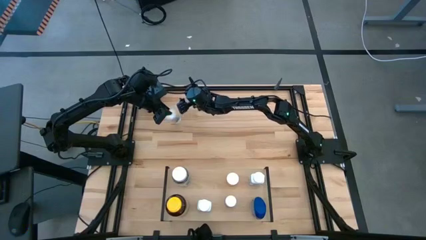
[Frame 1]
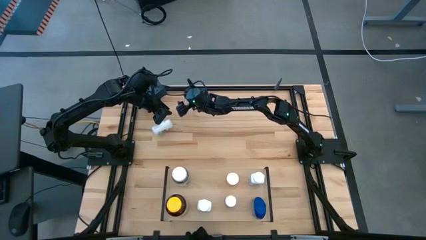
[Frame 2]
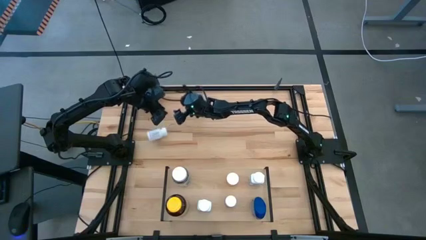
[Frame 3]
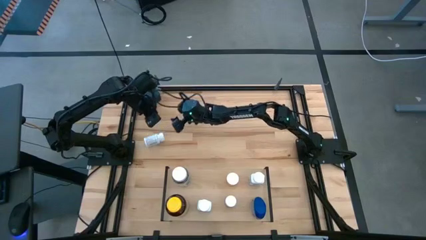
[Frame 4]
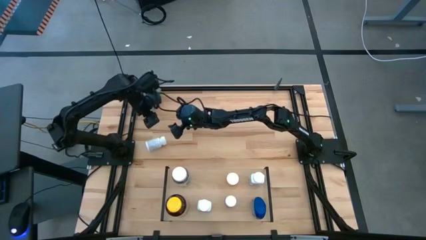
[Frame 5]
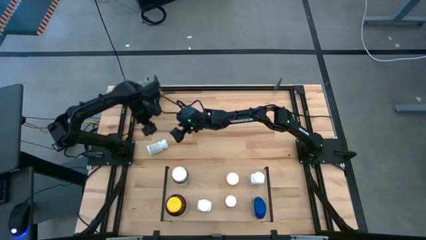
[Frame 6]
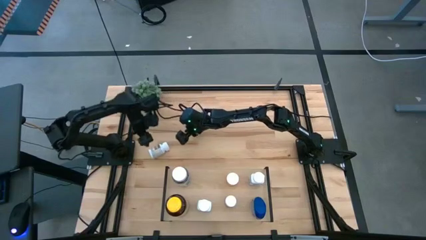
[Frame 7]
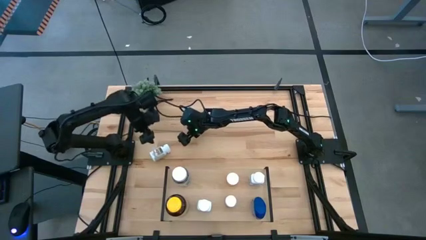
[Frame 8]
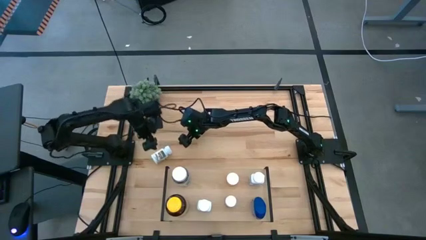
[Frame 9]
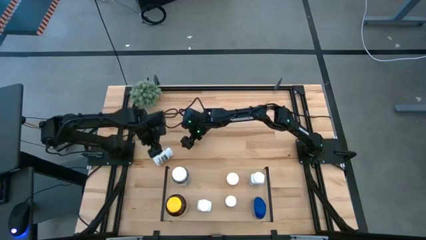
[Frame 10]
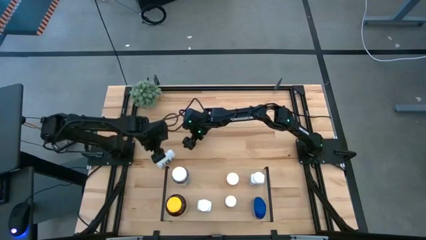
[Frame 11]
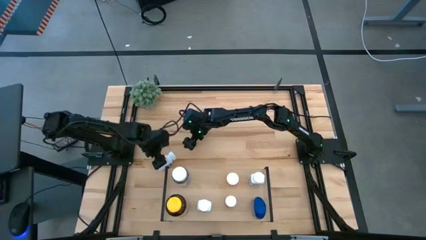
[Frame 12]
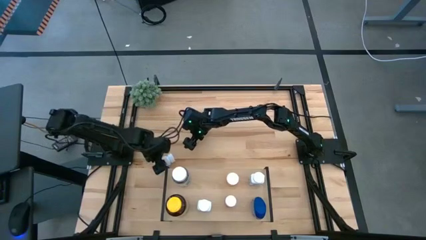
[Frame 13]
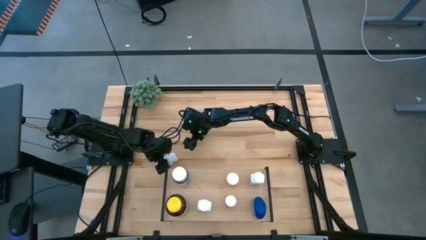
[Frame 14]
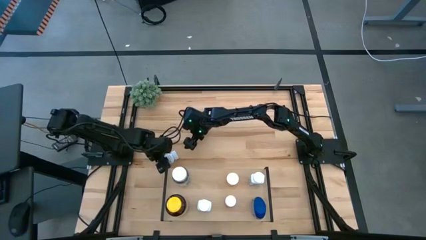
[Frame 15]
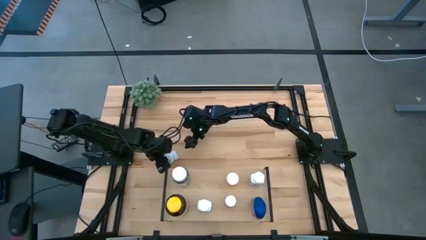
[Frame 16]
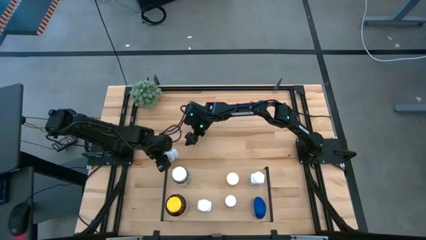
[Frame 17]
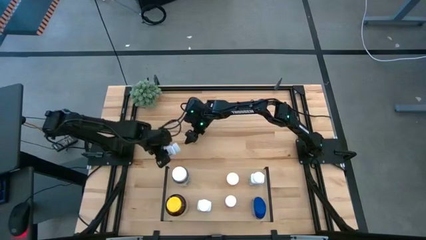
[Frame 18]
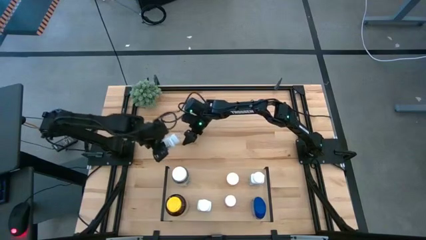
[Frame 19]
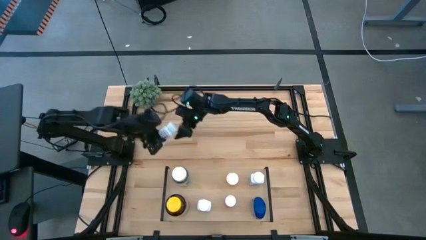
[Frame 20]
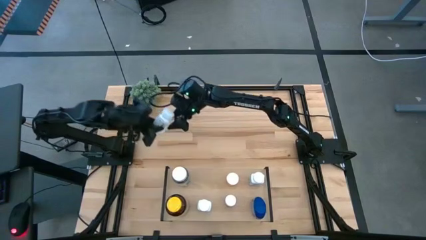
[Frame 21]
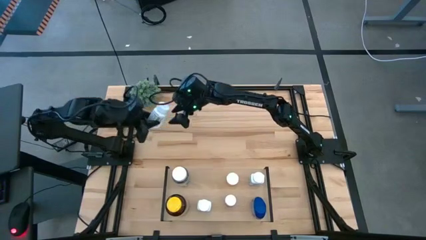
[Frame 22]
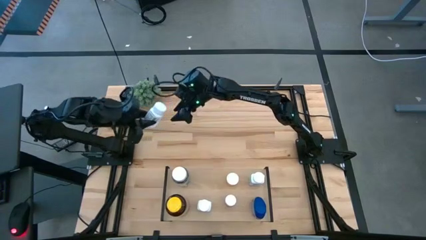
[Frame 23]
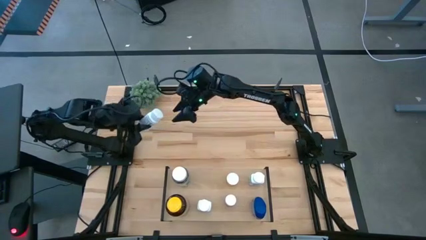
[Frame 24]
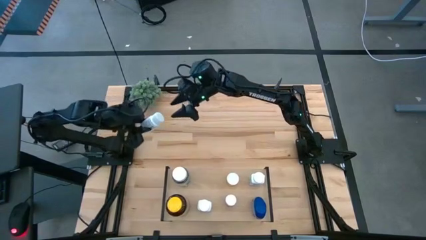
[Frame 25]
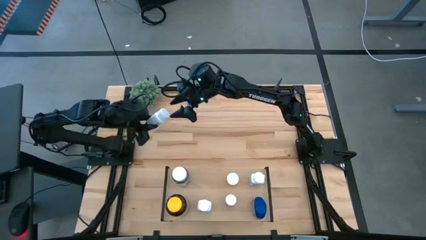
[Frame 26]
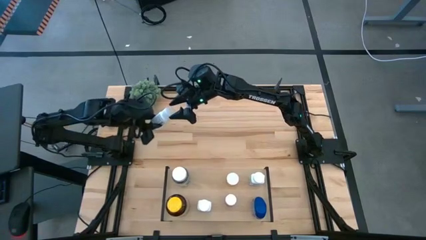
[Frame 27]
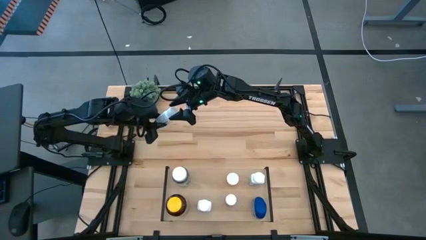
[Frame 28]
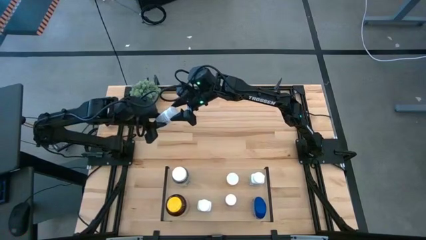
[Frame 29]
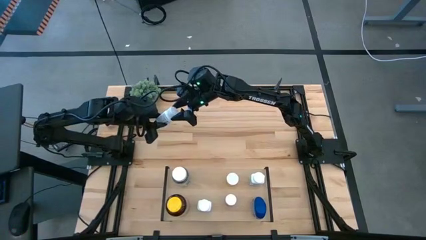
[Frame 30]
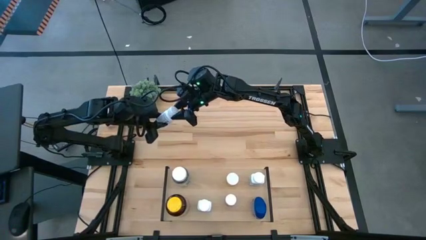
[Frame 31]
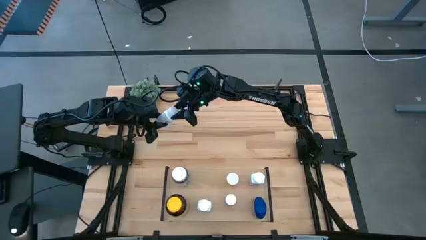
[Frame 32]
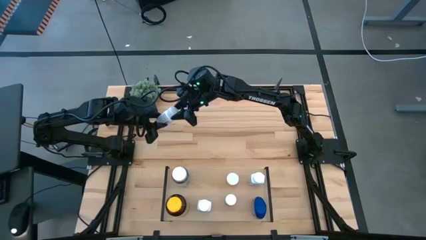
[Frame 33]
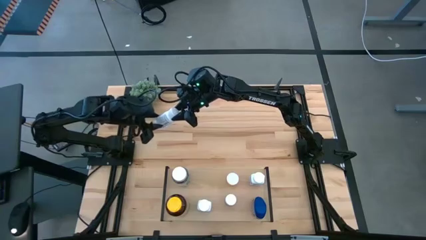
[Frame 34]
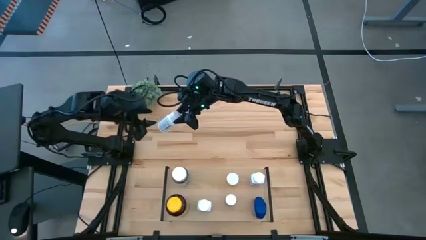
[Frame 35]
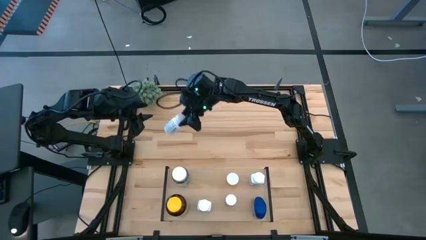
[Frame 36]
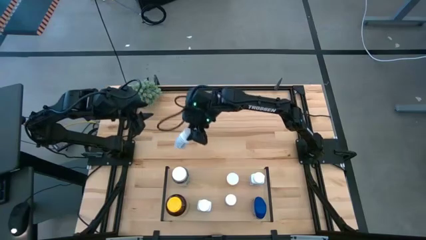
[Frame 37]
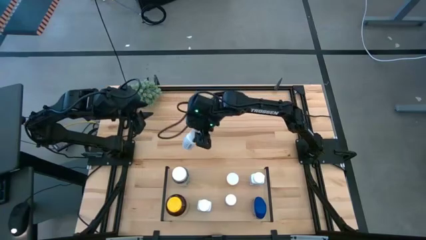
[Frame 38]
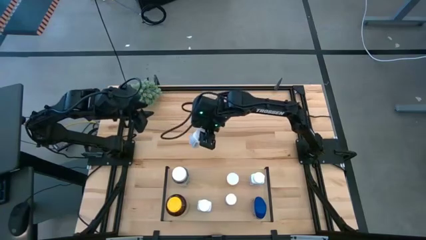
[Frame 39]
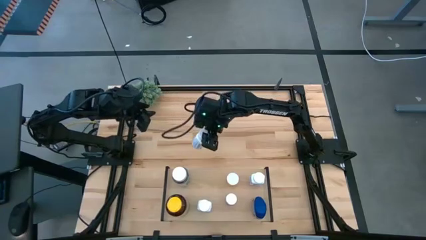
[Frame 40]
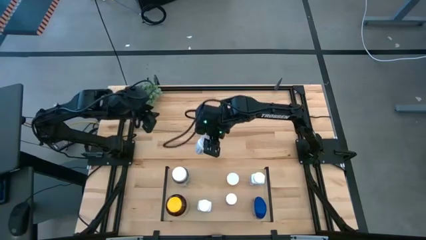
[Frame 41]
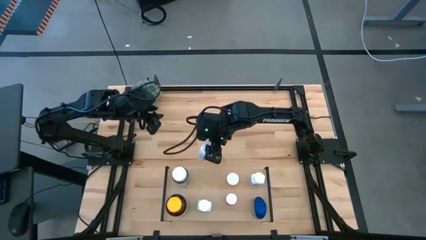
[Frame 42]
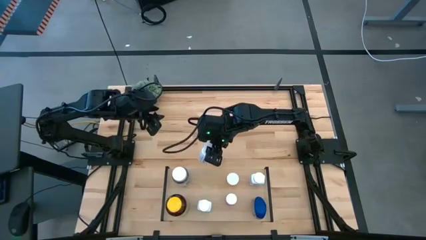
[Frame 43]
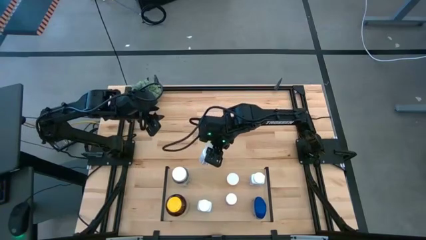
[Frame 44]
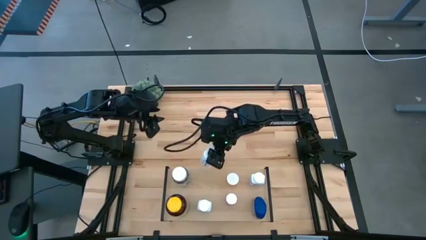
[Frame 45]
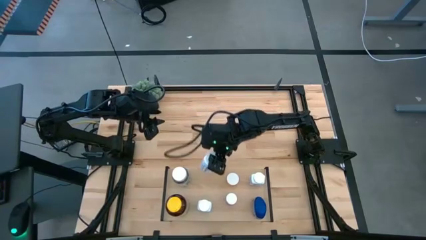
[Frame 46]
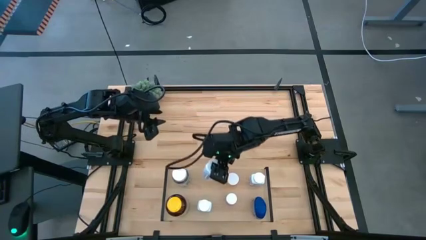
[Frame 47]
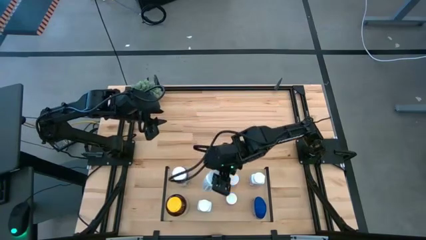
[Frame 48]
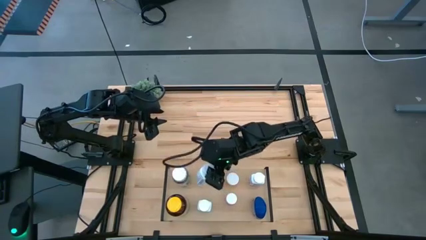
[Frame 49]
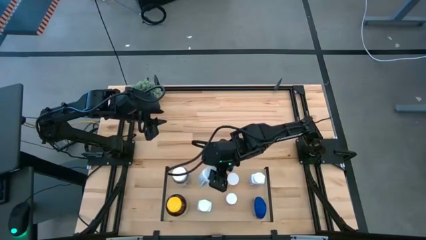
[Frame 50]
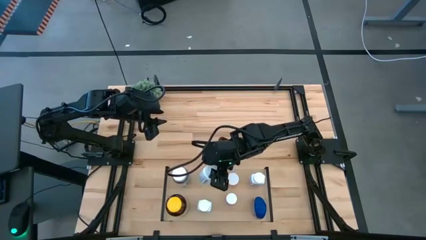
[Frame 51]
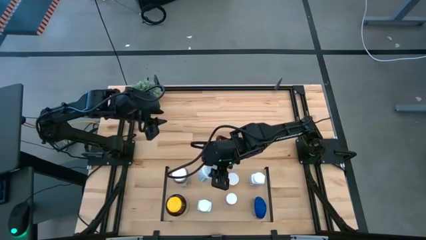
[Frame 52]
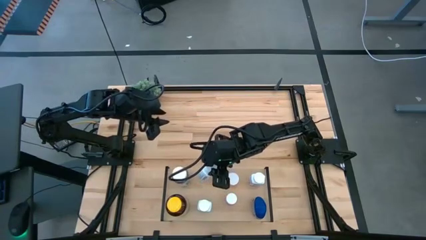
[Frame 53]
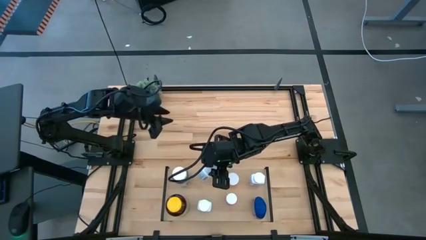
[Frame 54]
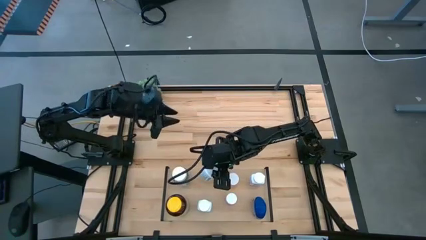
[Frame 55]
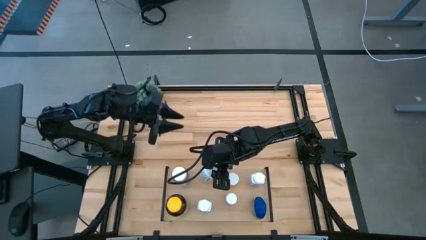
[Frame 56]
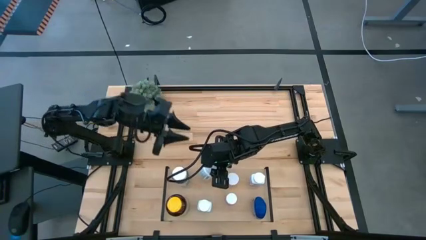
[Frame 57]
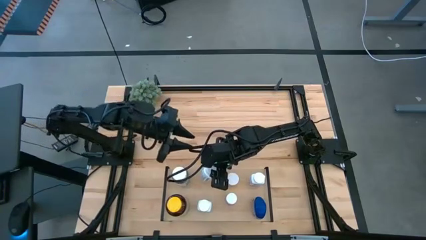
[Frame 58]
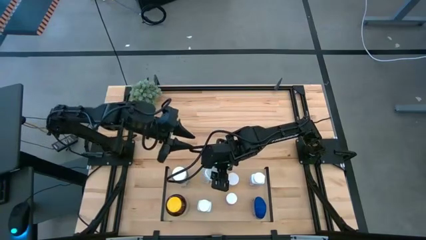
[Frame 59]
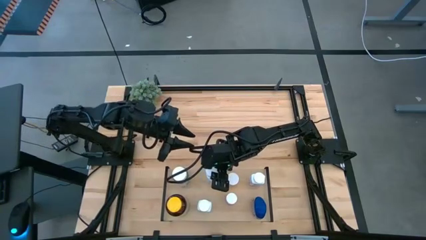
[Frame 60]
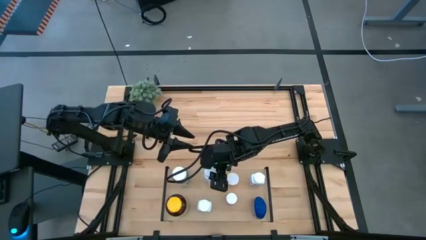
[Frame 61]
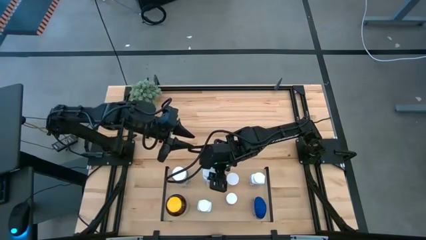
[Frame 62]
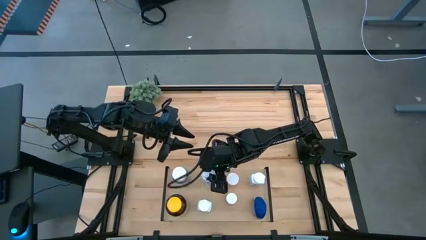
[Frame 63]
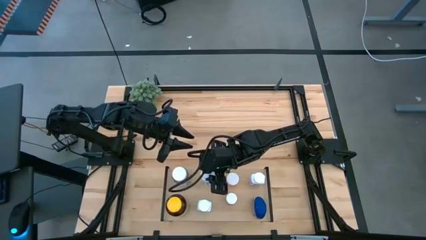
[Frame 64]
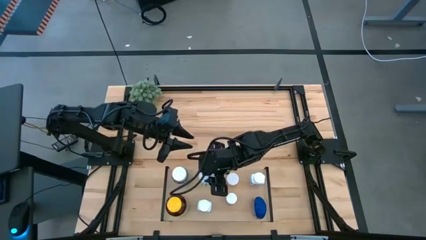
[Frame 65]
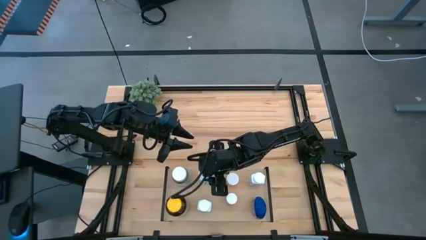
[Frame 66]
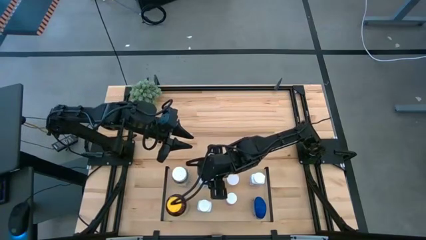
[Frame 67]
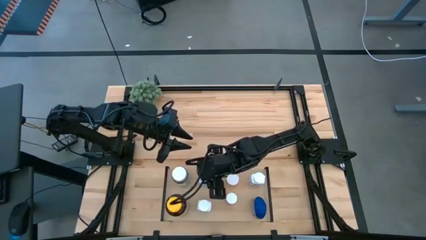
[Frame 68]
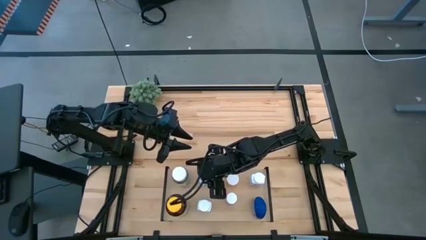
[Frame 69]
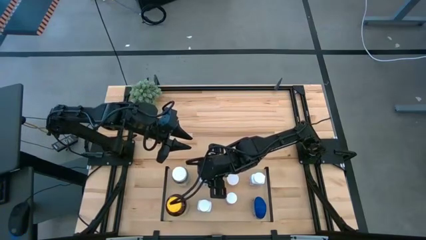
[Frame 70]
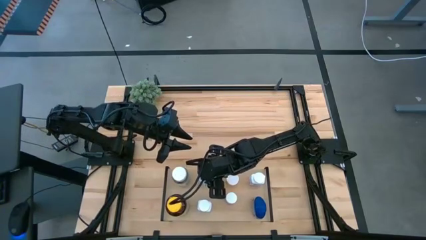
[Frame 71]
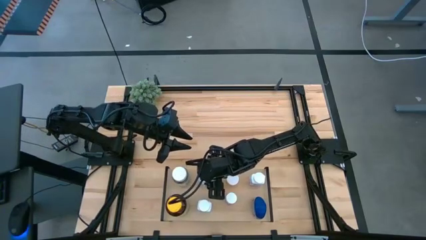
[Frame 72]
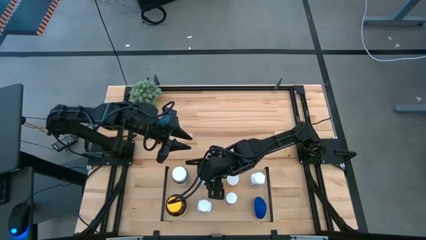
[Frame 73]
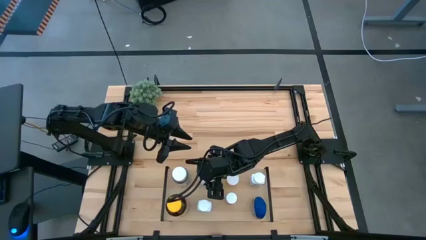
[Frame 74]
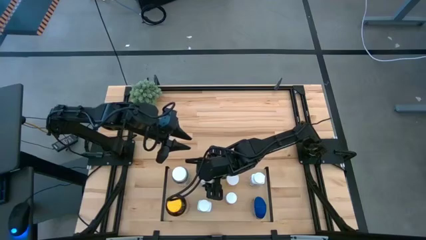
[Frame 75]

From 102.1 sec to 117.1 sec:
Task: Pick and place medicine bottles onto shelf by color
Put the white pill bottle on the shelf
